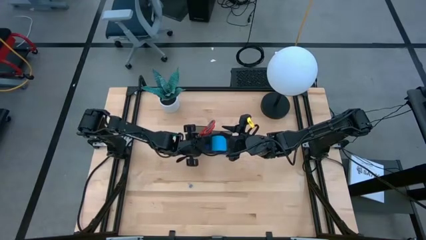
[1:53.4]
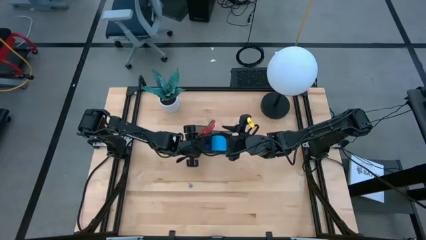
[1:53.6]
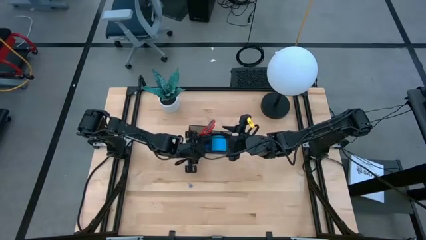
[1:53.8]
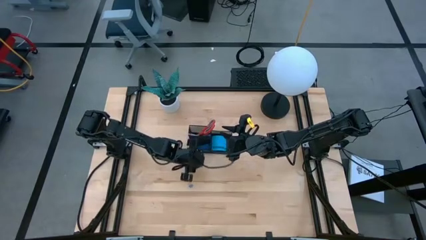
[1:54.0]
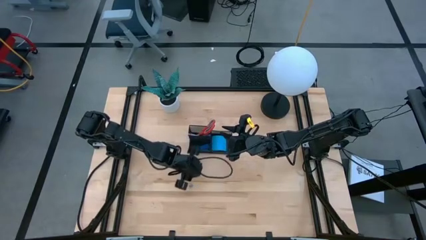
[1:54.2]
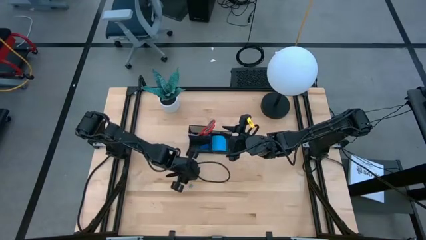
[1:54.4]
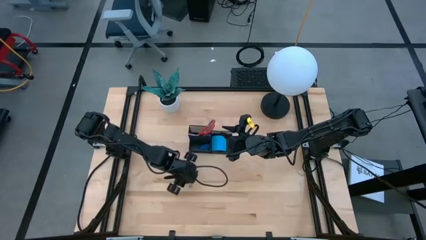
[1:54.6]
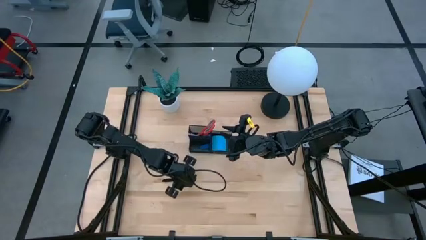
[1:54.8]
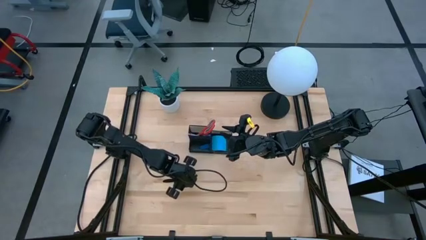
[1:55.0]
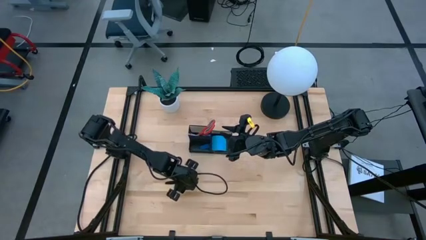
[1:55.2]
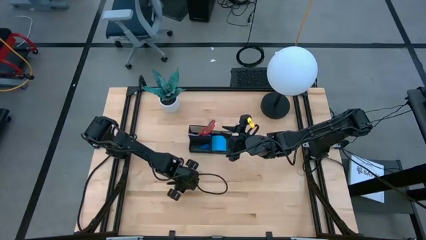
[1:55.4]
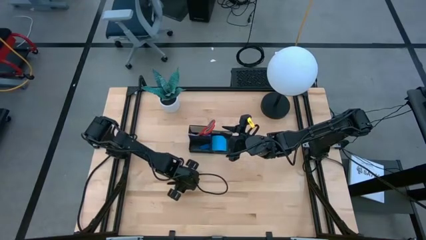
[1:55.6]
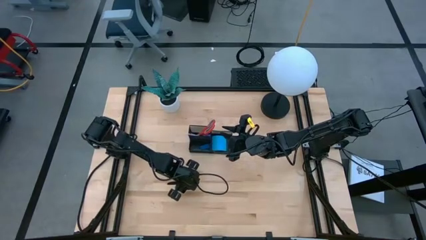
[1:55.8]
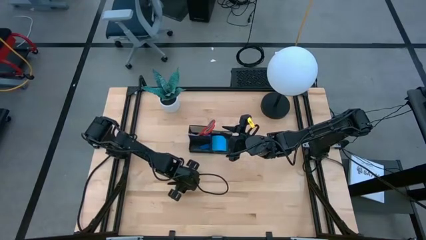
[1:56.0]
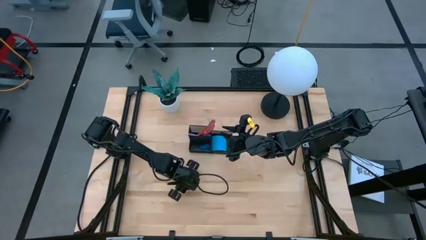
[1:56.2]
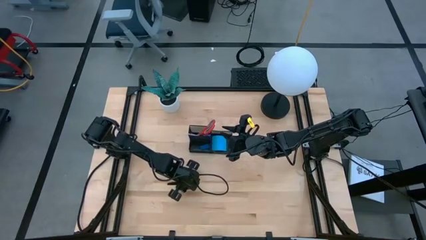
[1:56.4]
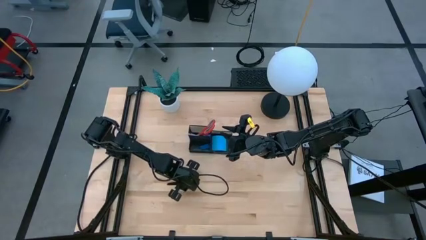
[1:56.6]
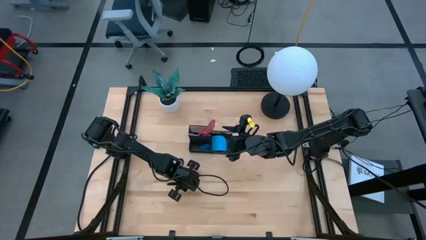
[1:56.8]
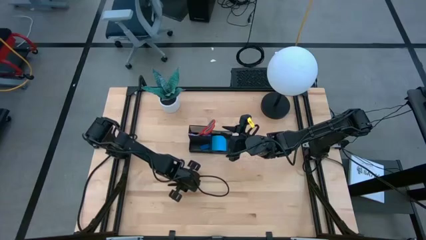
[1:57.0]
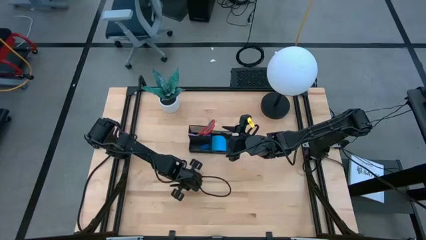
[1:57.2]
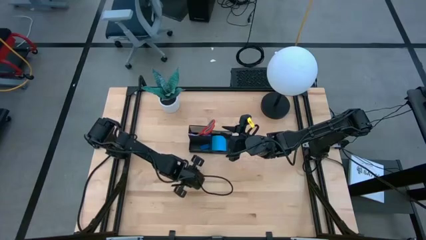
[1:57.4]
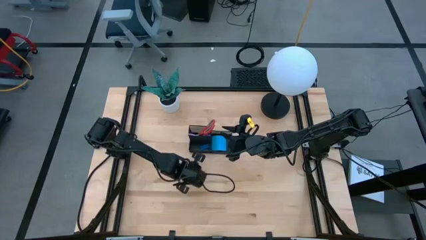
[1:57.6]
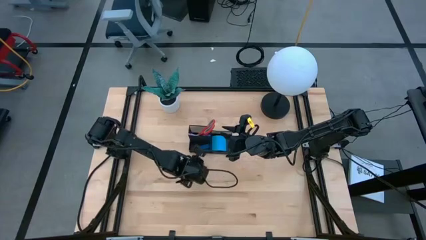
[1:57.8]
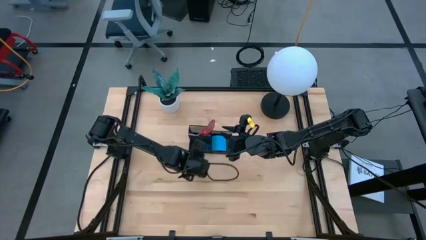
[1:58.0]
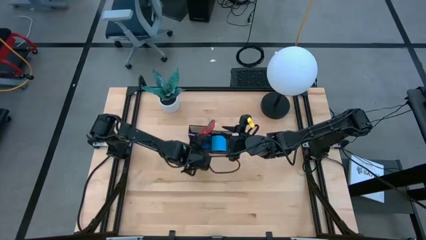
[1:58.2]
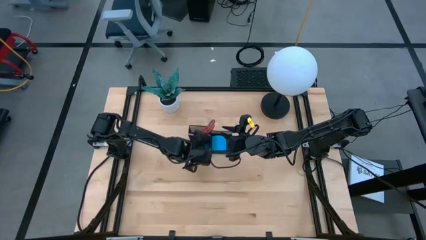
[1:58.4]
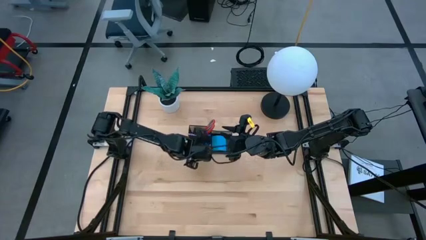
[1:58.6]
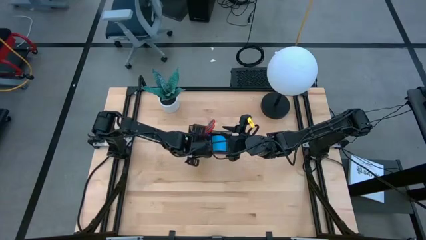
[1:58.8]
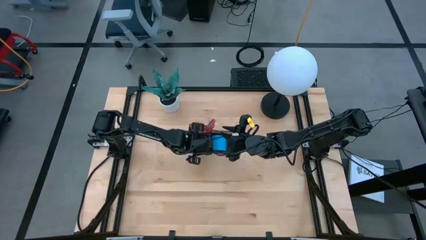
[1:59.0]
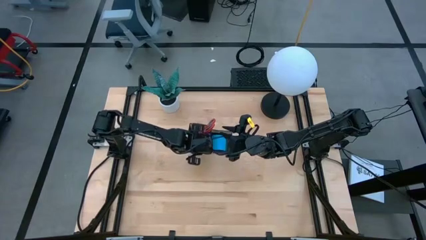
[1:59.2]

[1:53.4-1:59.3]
Task: Pick and place office supplies into organizer
Put the blue binder clip into the black desk organizer

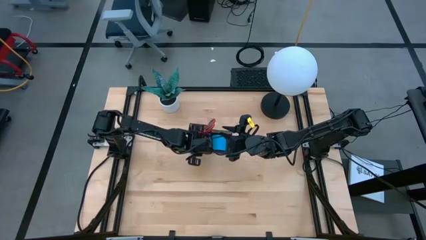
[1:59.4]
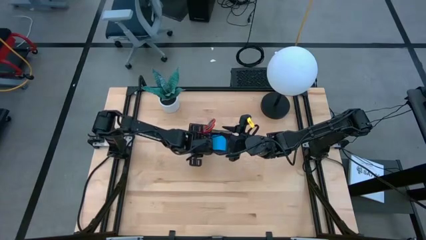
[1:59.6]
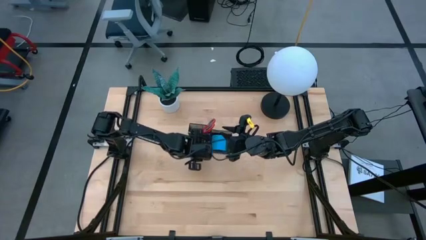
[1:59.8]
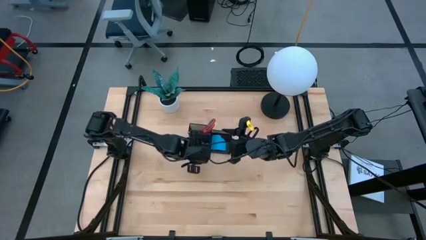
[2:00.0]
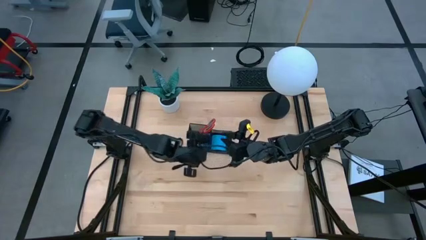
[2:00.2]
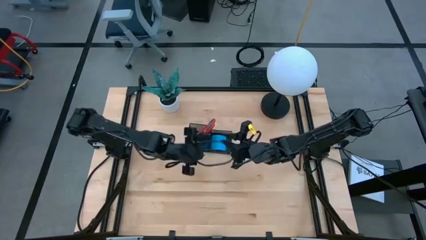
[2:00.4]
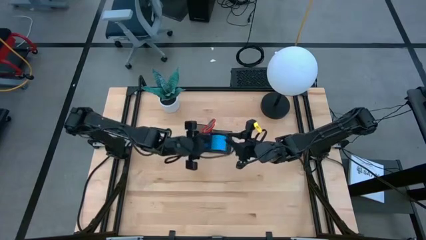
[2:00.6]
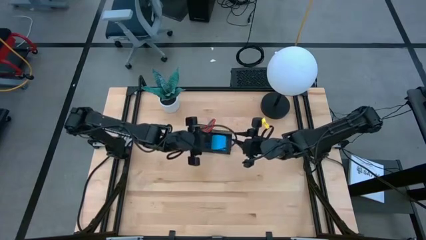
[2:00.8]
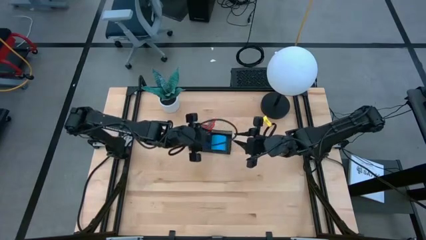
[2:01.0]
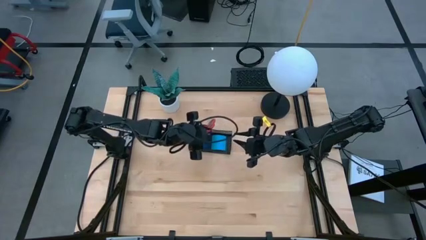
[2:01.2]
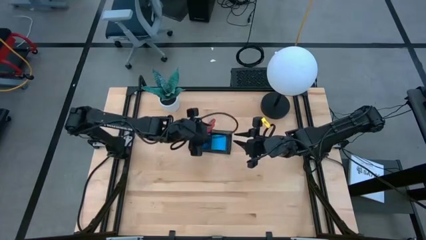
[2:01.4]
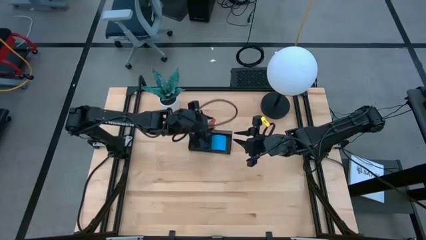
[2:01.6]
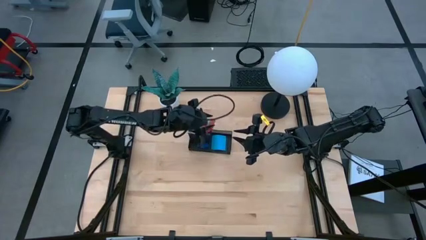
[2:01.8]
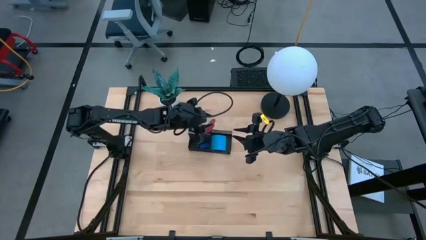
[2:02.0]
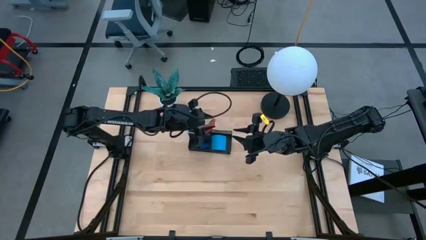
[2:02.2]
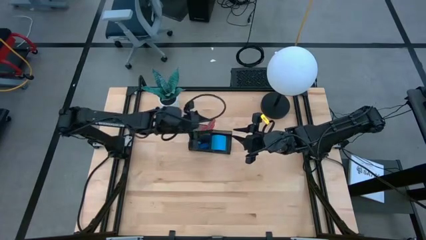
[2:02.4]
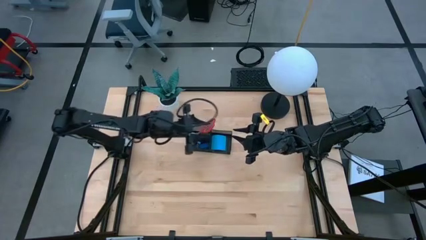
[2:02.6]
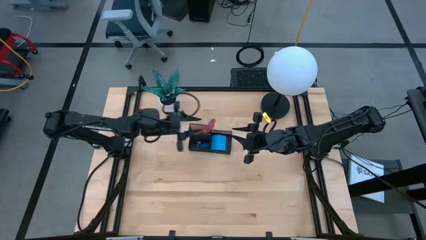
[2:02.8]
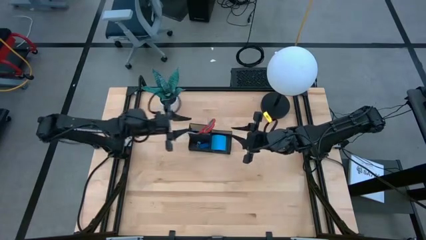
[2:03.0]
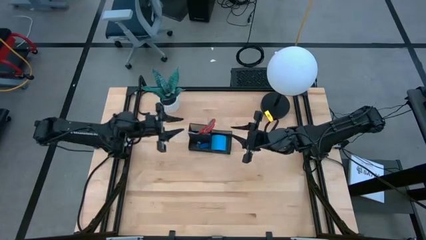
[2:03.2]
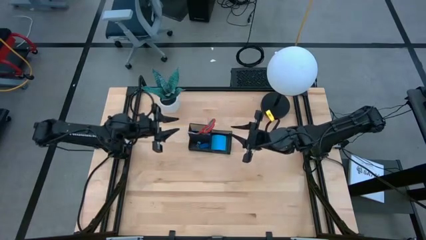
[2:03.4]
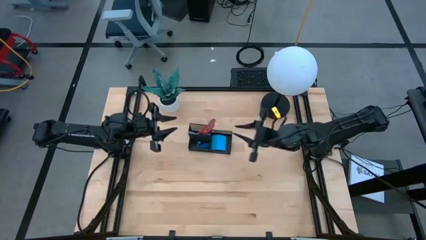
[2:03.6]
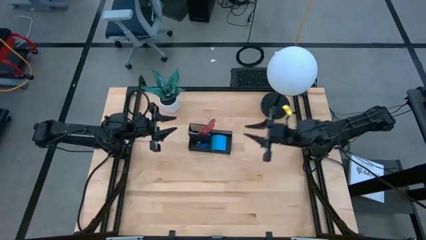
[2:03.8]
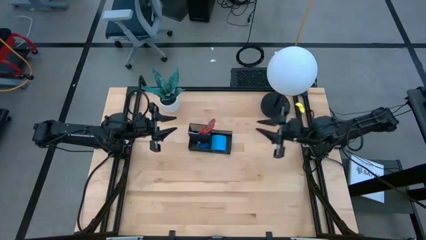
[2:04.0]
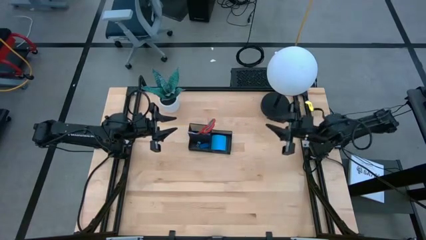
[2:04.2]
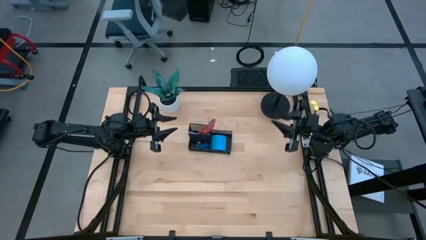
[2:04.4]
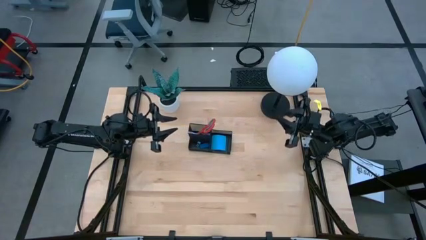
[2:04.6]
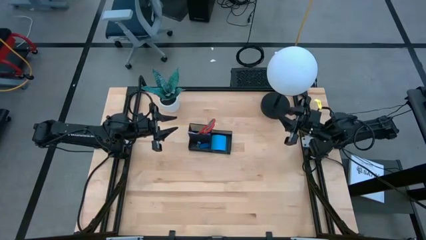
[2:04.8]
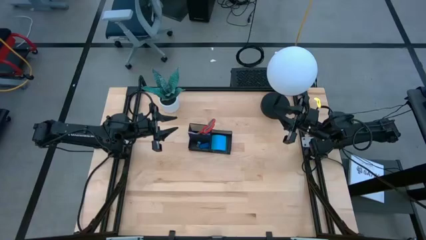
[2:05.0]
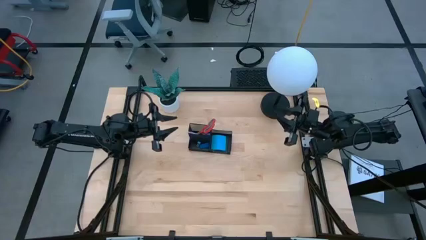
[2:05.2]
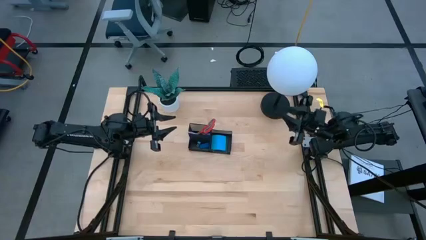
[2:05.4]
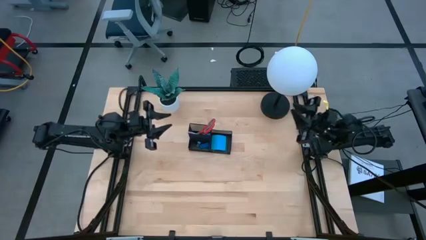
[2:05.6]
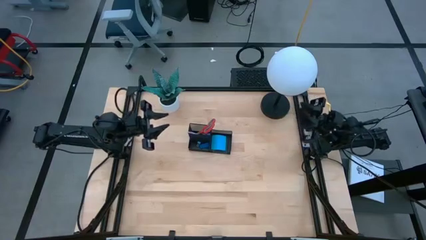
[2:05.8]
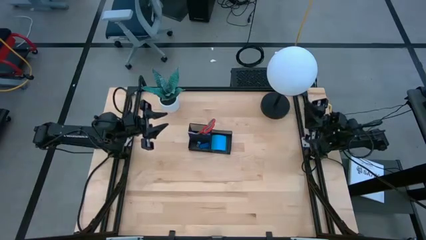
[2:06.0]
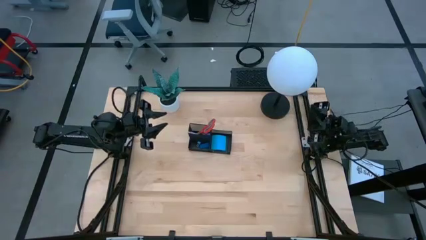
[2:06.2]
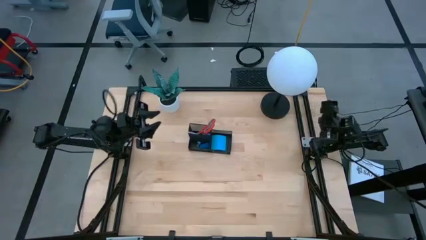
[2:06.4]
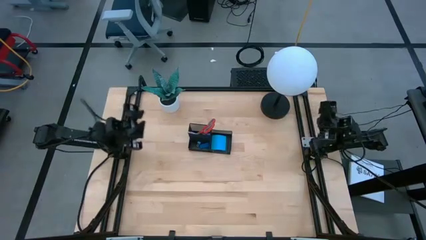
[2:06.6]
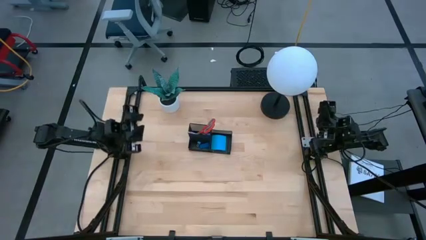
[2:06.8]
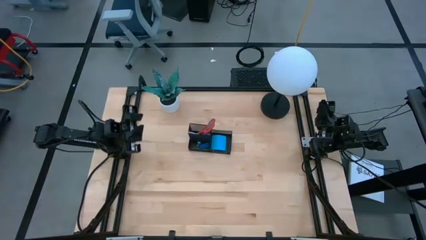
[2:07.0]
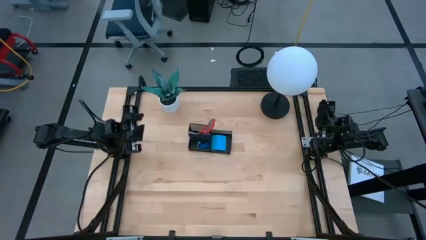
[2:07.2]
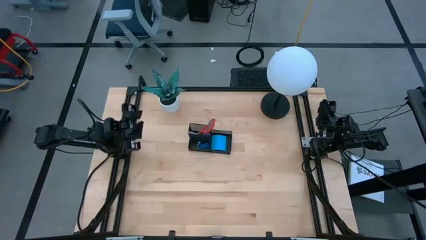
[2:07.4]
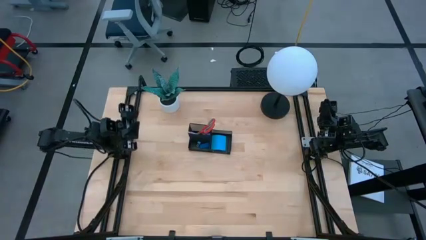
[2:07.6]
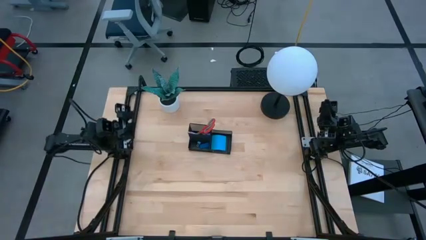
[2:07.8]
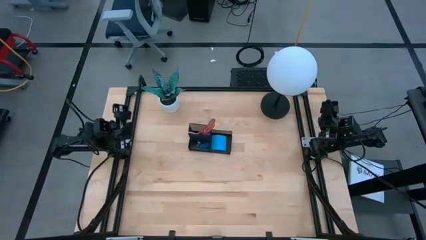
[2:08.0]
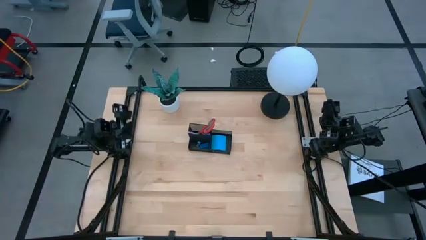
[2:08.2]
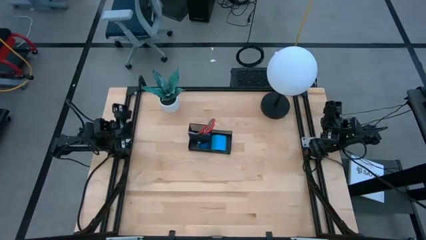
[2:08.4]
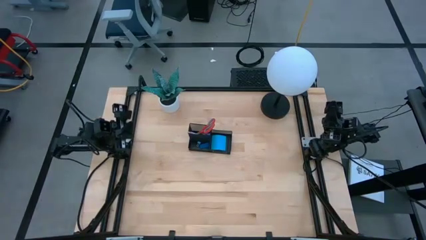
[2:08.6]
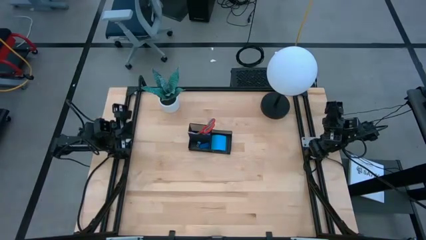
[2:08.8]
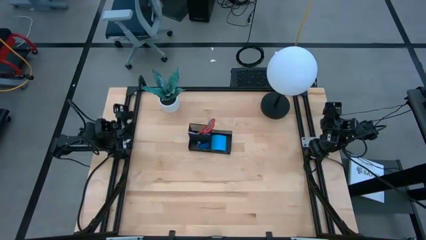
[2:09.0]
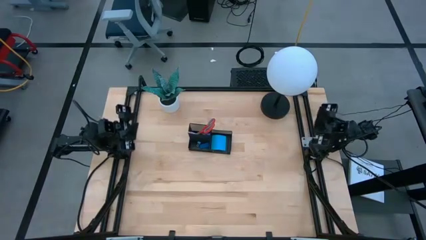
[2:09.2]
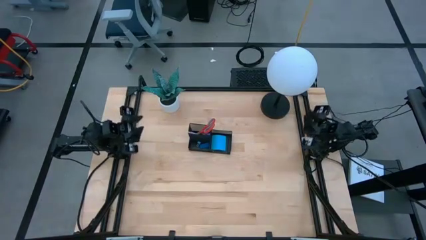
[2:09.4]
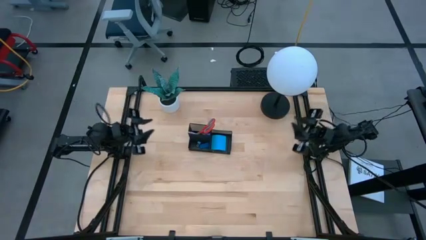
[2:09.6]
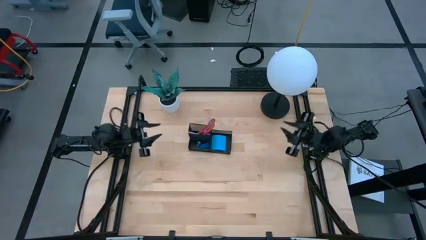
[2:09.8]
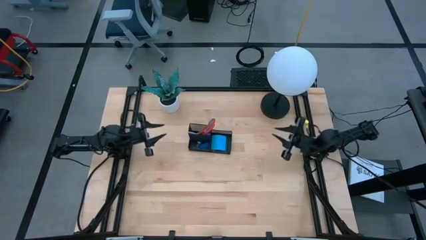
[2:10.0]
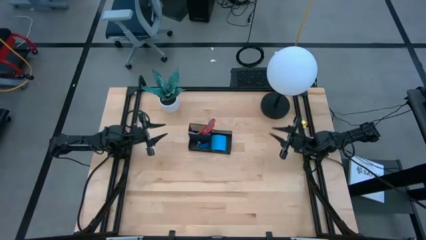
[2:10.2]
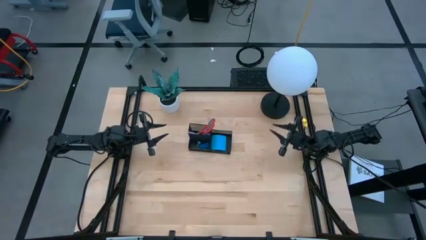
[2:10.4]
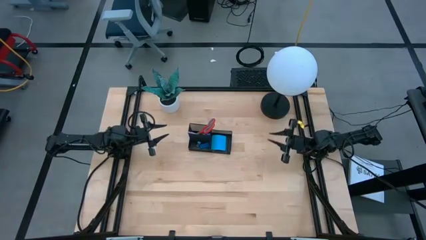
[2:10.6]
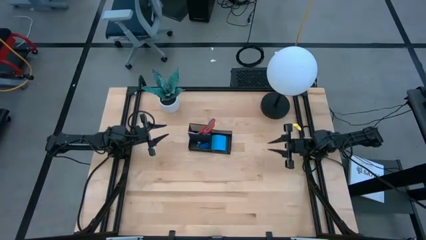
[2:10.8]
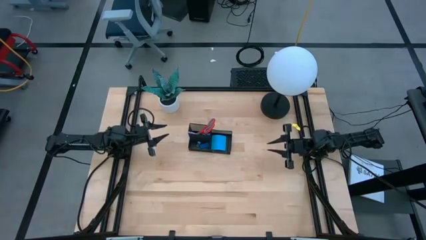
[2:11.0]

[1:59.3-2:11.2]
Return to Home Position
